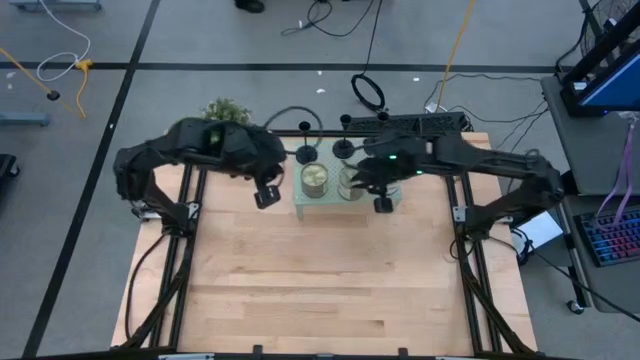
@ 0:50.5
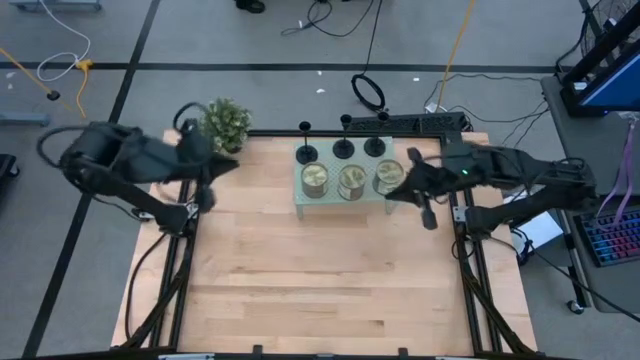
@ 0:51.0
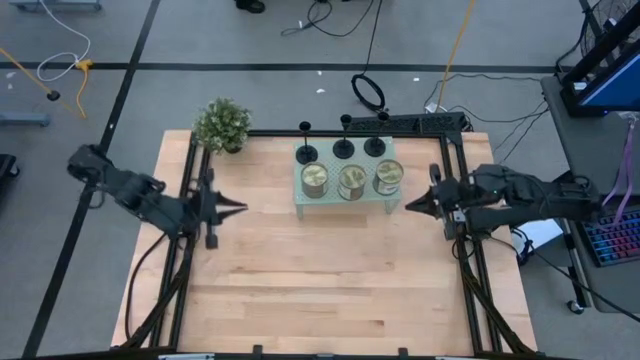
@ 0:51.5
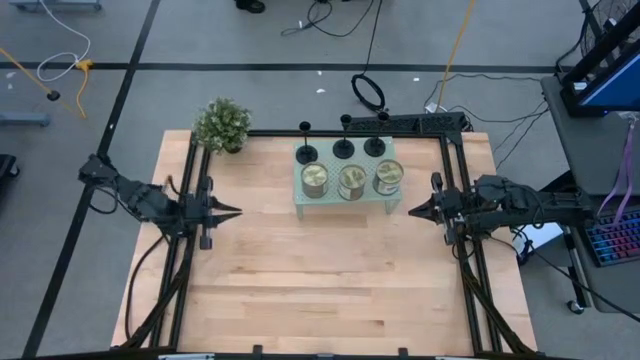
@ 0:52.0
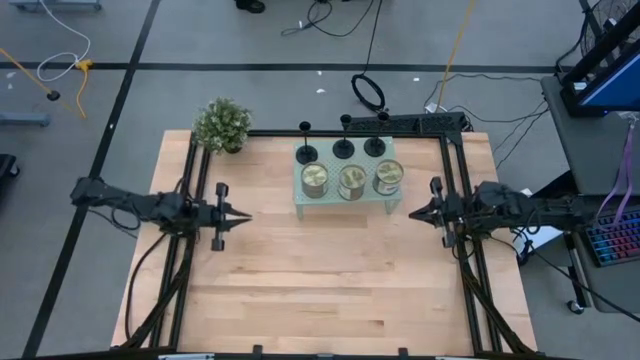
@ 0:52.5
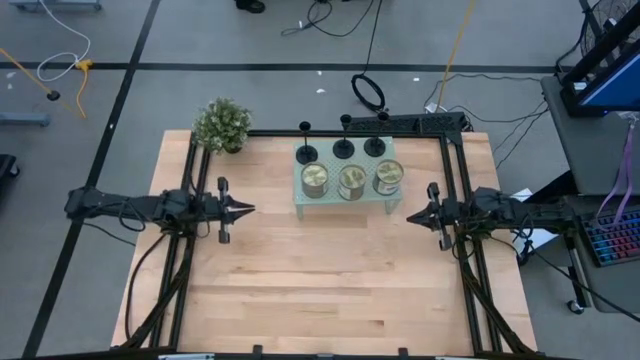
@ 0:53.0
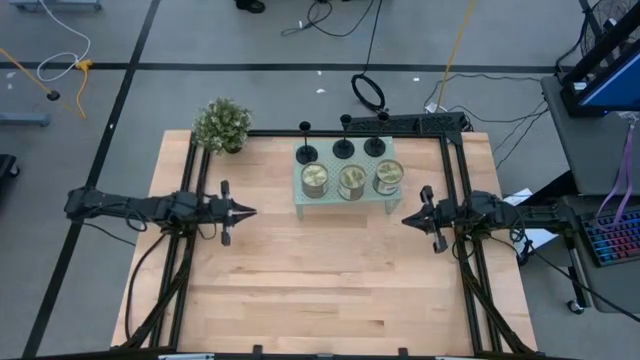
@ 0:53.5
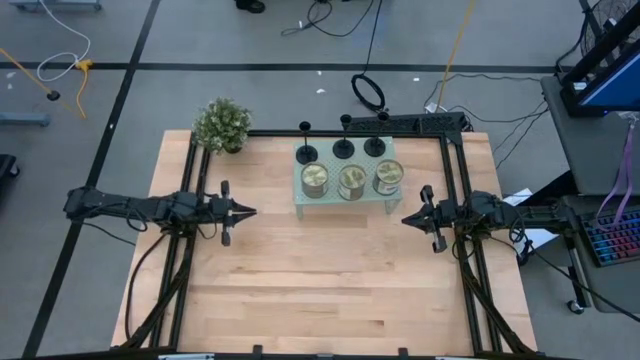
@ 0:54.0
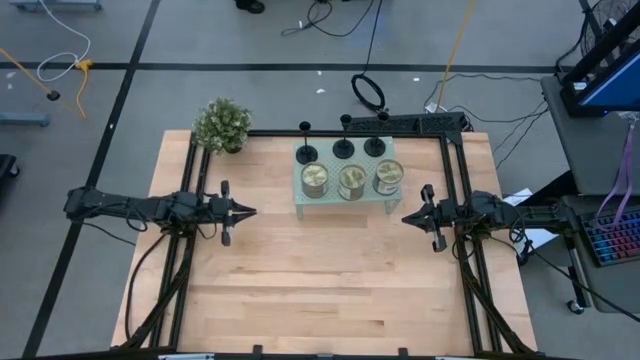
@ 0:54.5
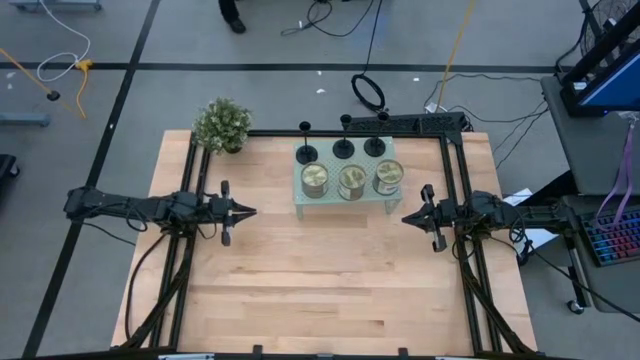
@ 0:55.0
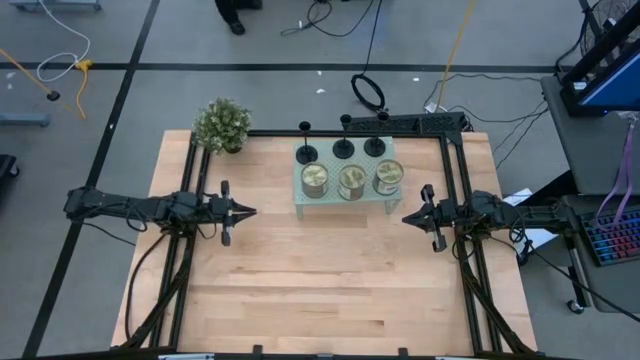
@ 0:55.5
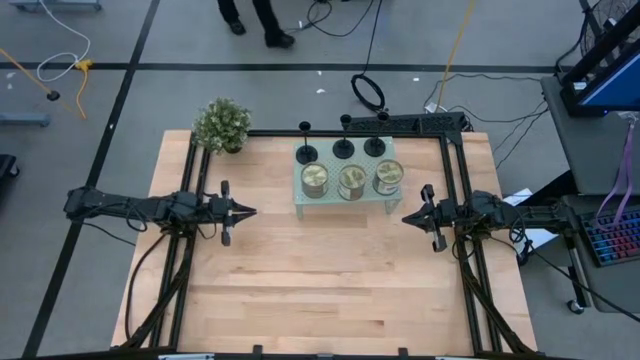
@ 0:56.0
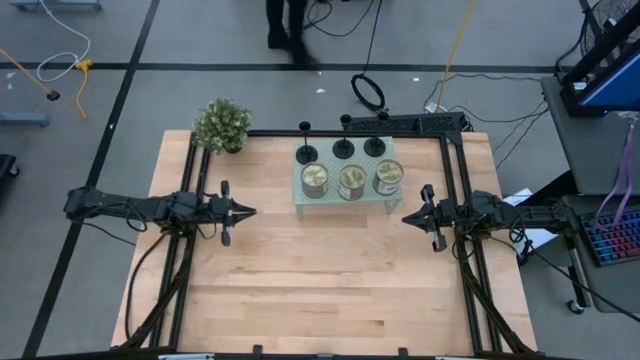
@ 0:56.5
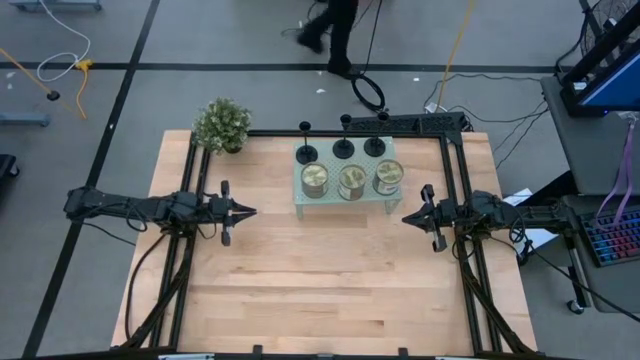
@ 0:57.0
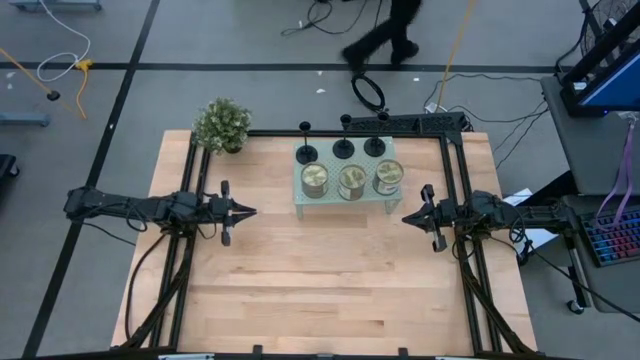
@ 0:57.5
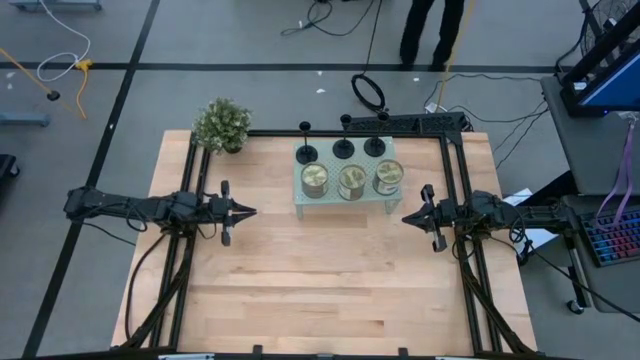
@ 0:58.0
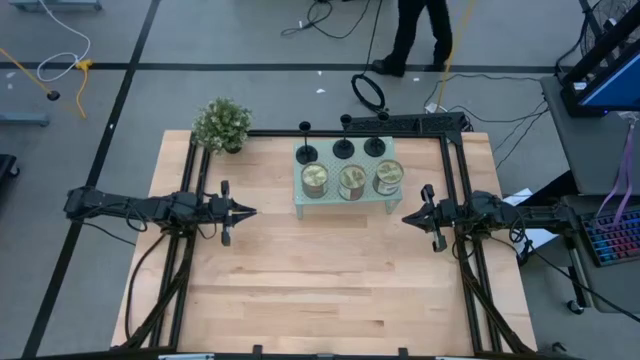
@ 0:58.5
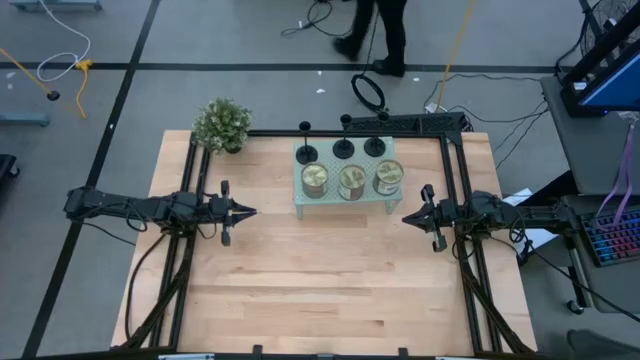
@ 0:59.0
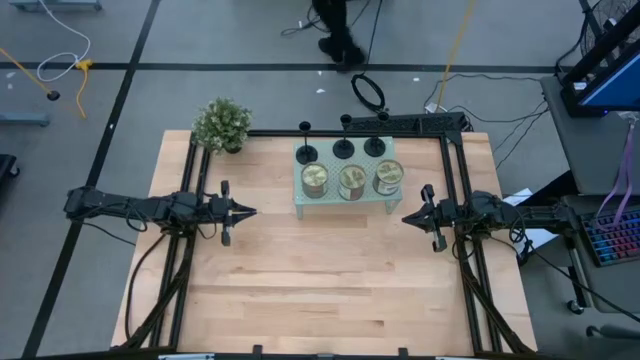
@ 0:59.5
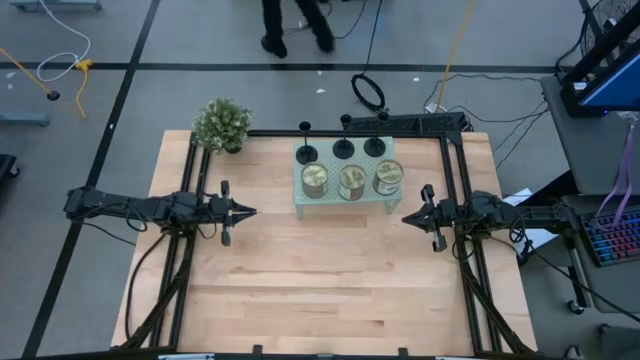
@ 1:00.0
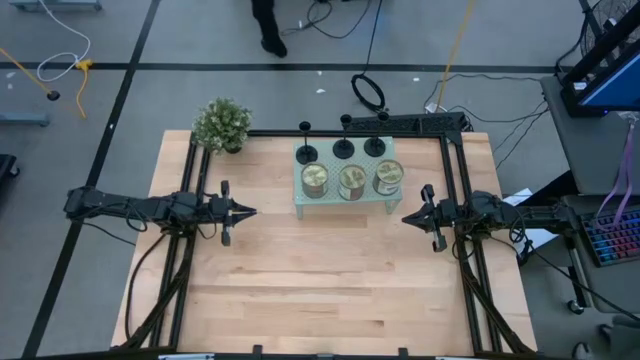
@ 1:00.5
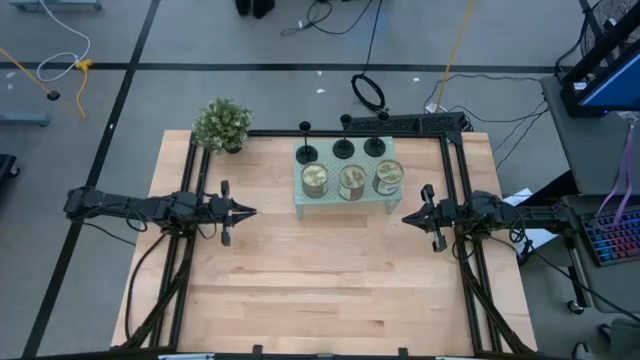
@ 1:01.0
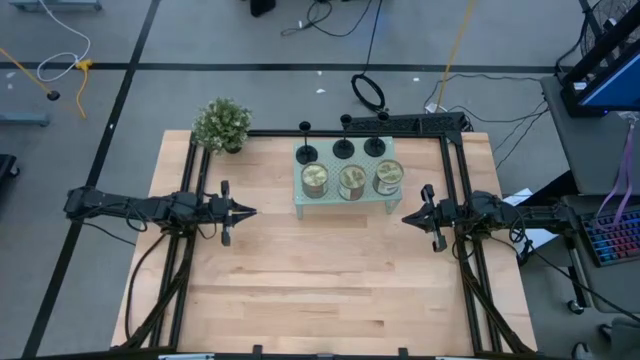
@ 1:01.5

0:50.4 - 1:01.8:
Task: Pick & Place candle stick holders
Return to Home Position

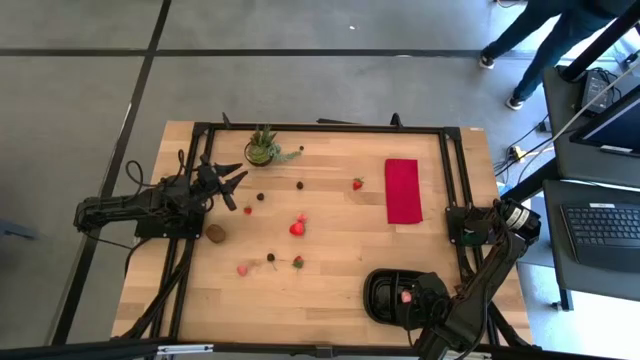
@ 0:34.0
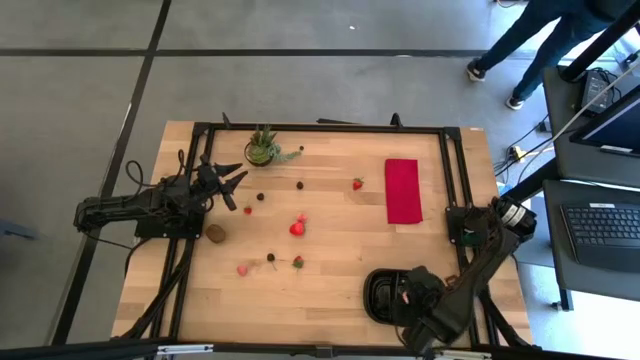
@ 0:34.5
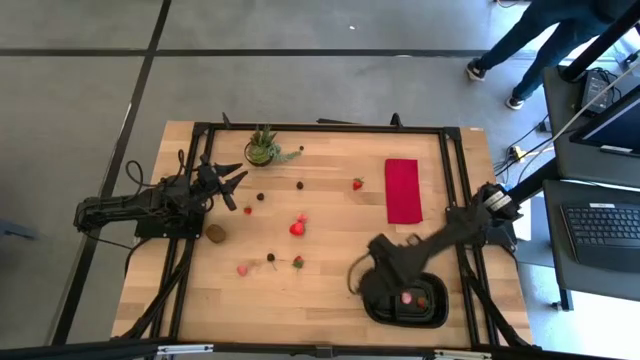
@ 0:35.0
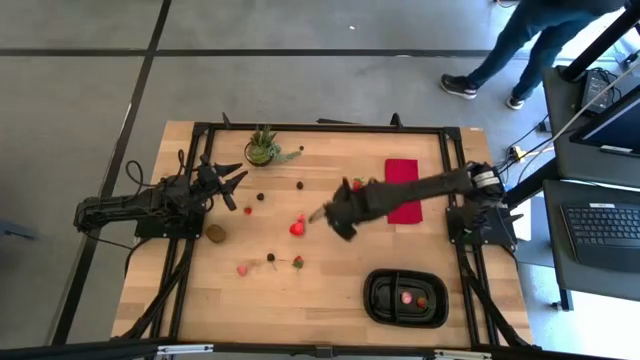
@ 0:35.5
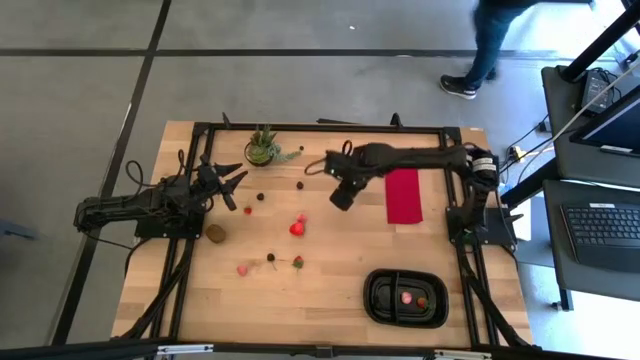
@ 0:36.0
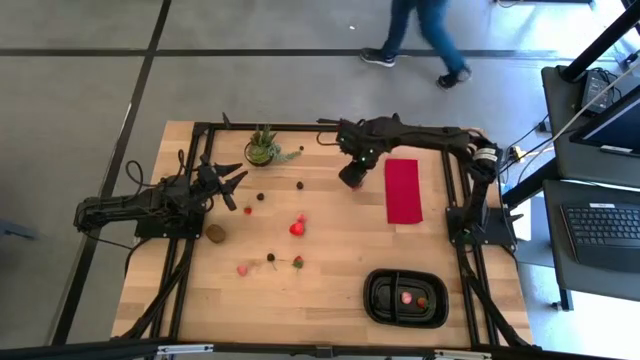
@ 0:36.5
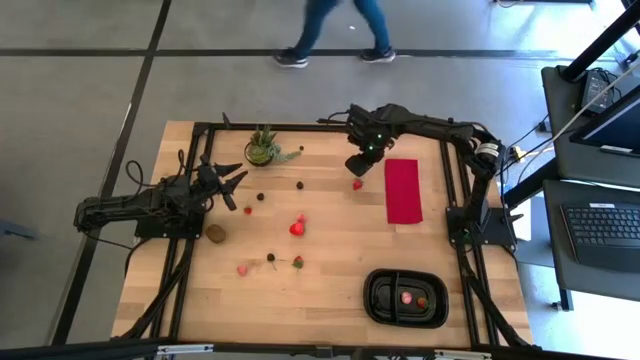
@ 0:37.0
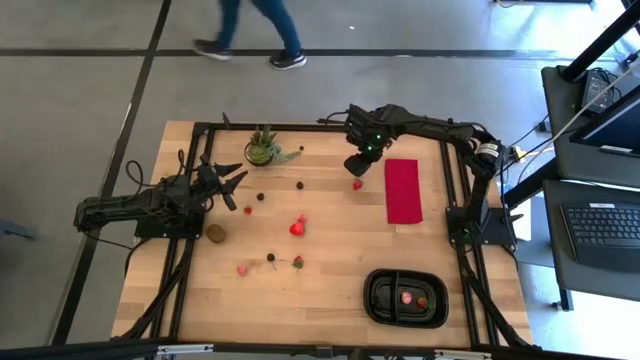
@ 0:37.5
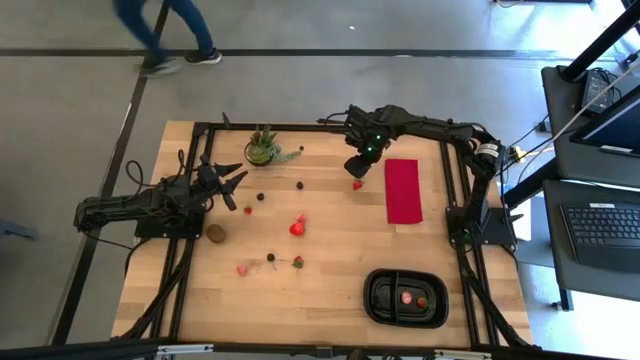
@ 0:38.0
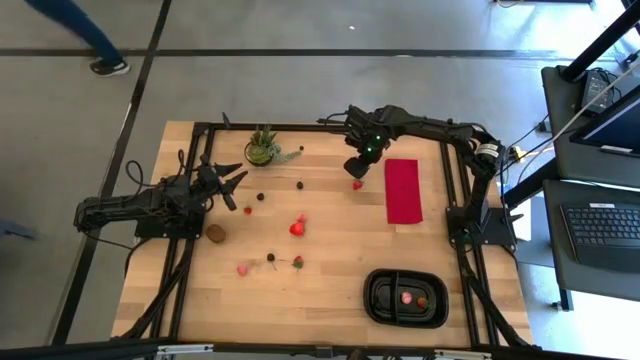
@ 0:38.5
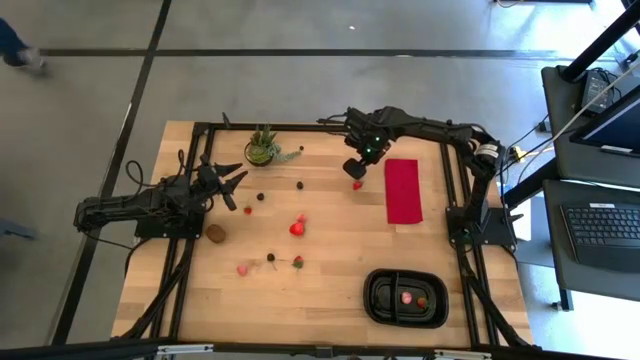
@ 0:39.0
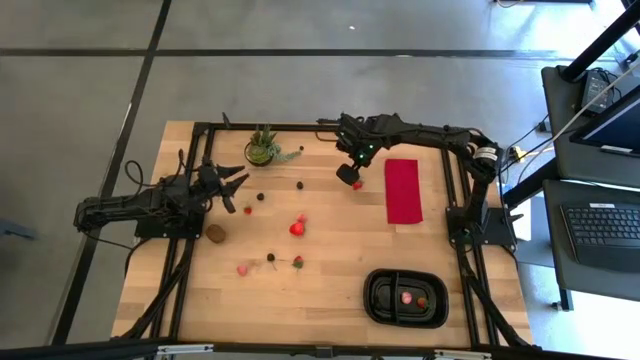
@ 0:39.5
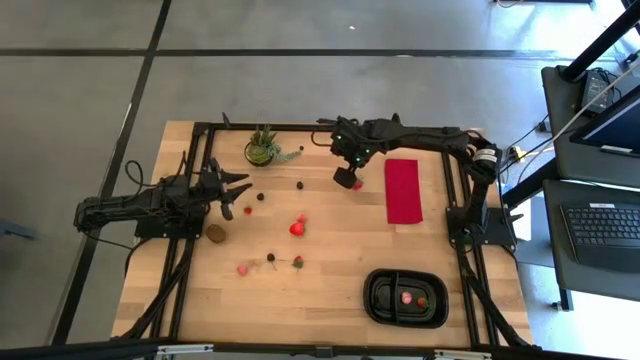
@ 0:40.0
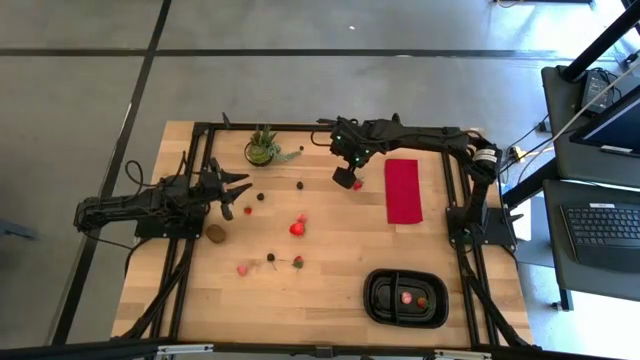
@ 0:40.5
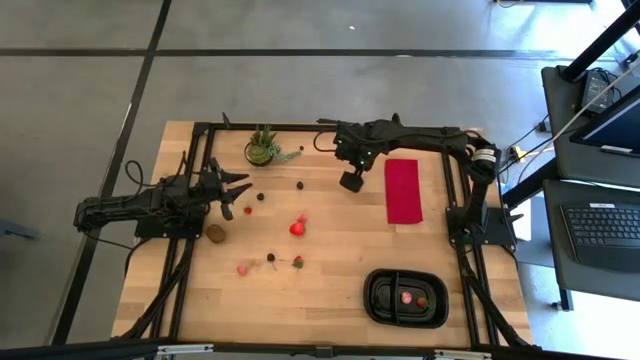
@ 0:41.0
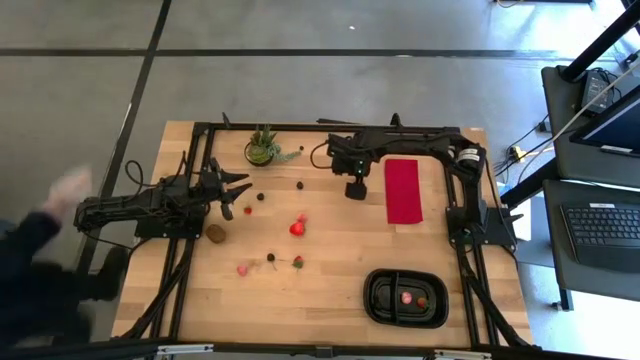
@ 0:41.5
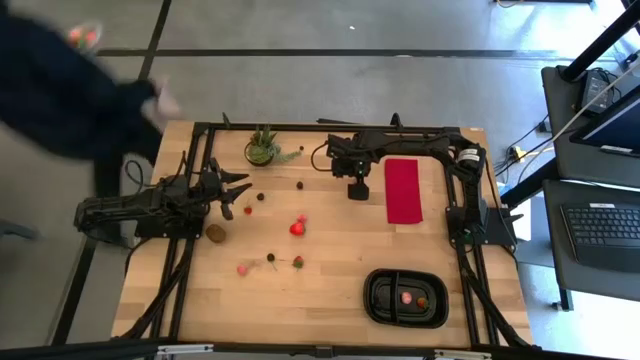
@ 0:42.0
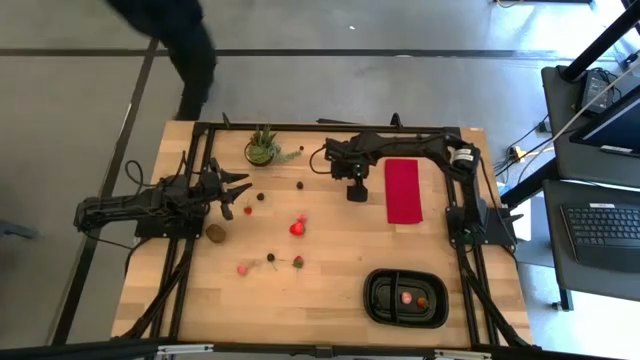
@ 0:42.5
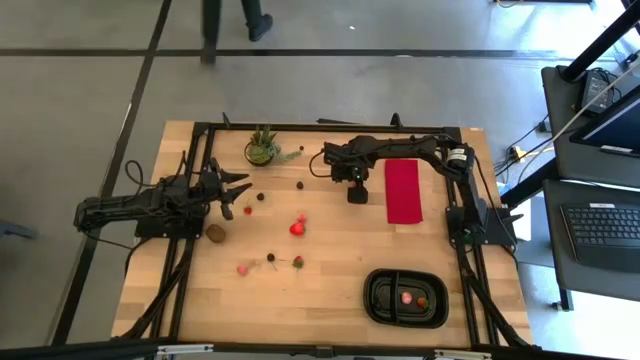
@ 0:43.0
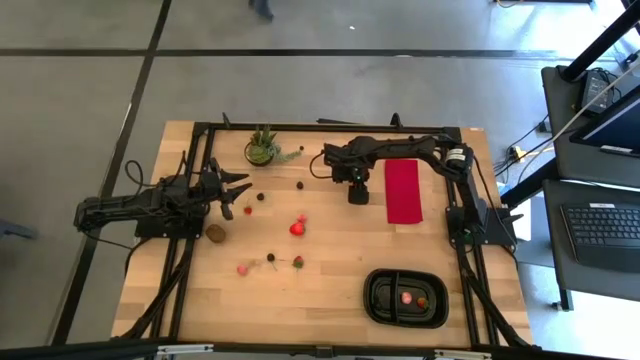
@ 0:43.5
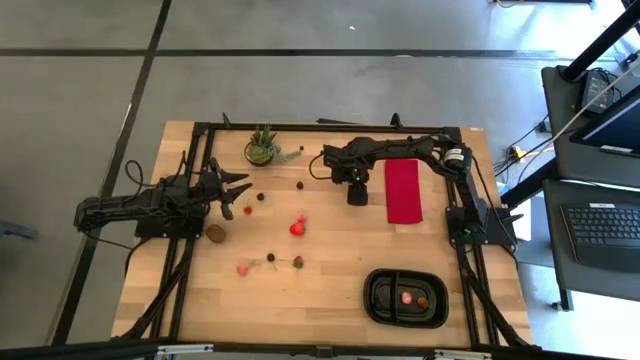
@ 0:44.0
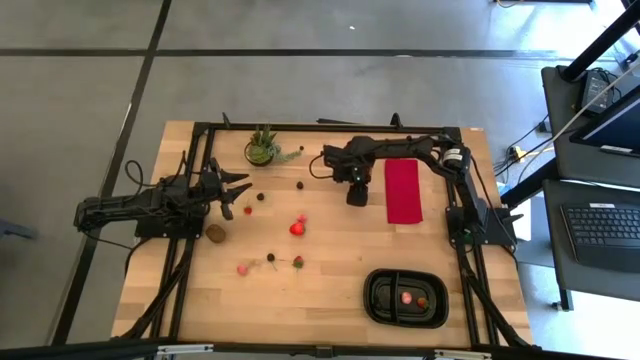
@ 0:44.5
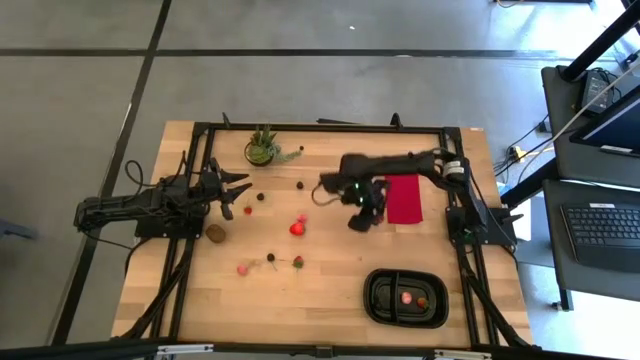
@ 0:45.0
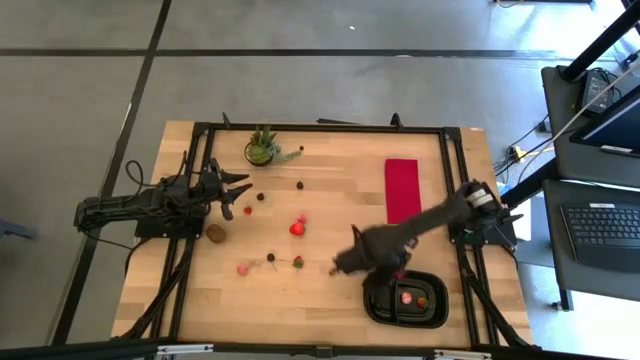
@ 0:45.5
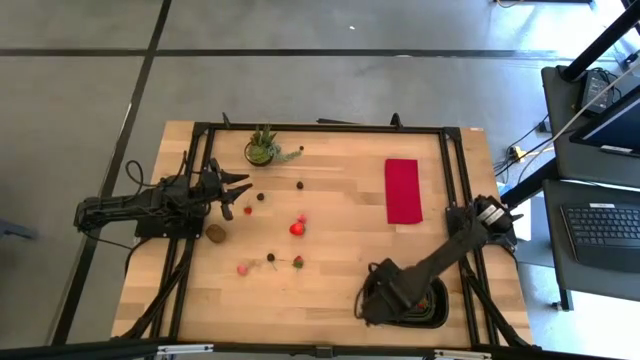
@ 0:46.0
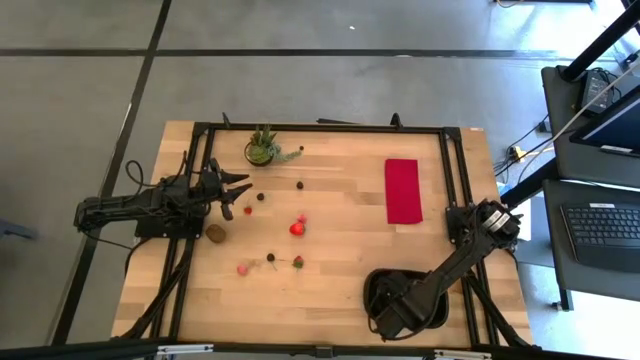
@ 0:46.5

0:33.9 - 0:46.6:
Task: Pick and placing Produce into tupperware
Put the strawberry into the right of the black bin
